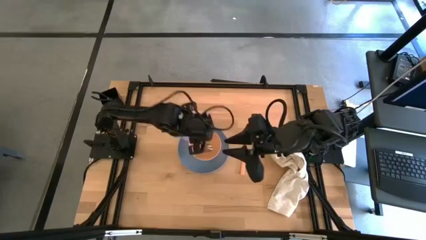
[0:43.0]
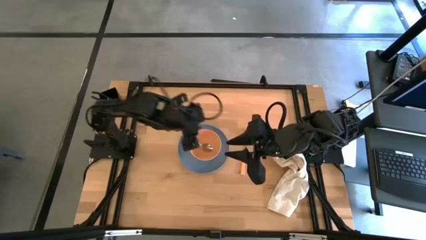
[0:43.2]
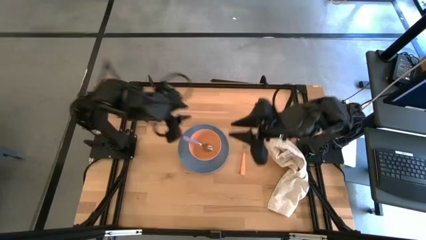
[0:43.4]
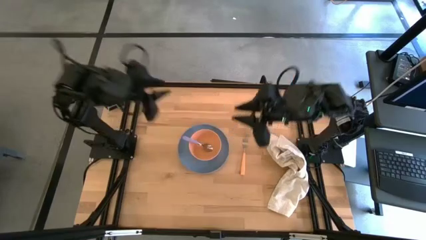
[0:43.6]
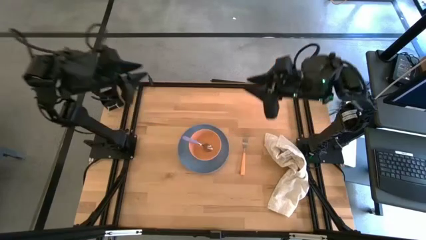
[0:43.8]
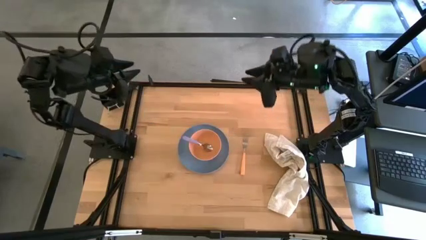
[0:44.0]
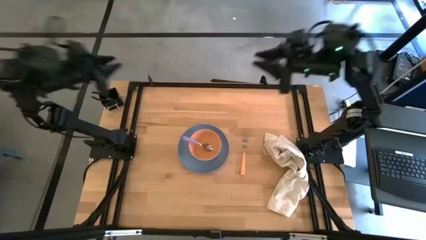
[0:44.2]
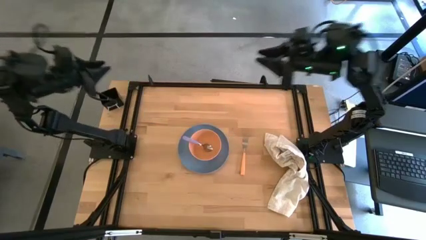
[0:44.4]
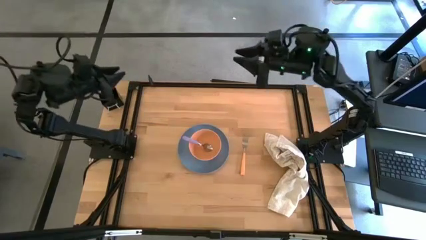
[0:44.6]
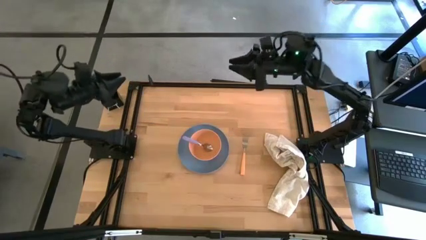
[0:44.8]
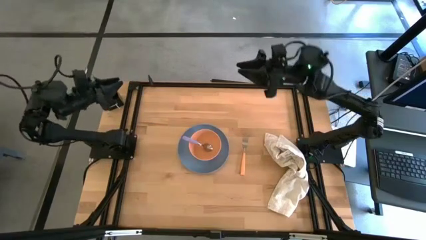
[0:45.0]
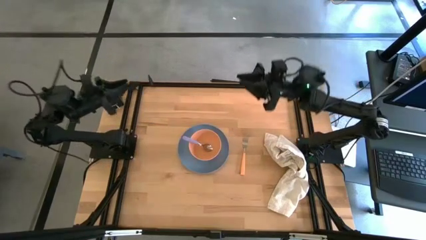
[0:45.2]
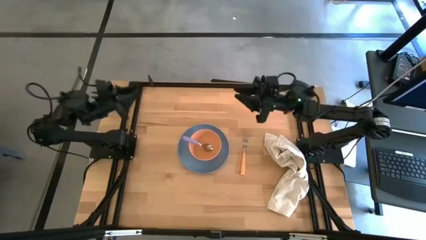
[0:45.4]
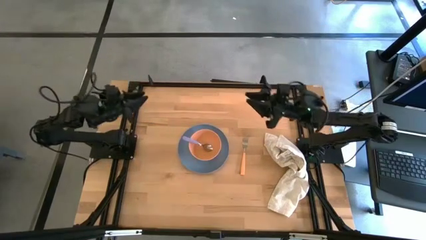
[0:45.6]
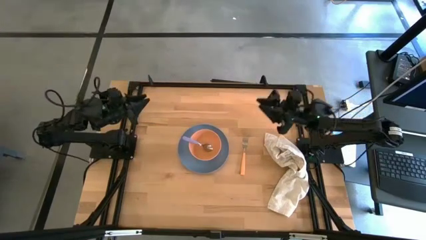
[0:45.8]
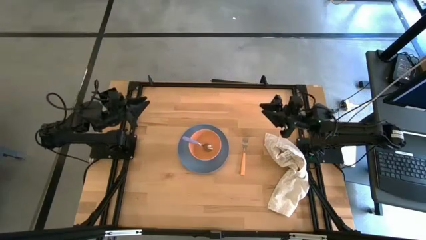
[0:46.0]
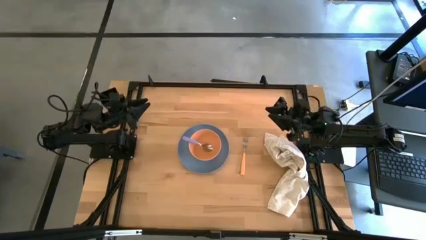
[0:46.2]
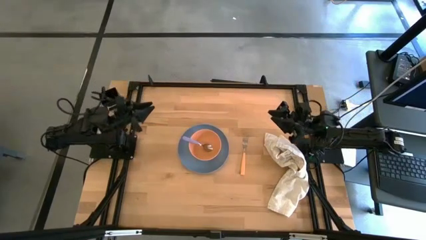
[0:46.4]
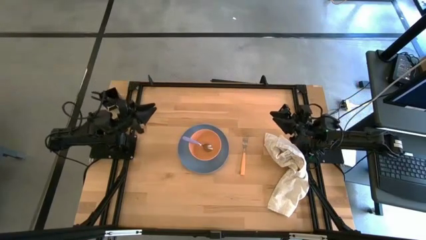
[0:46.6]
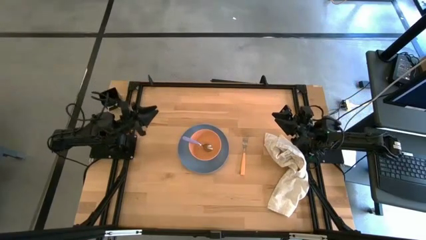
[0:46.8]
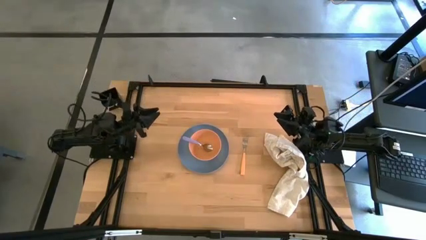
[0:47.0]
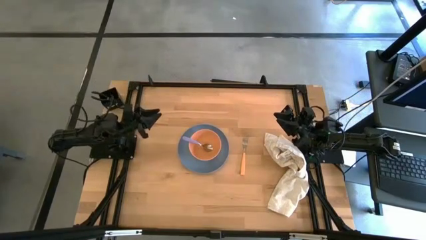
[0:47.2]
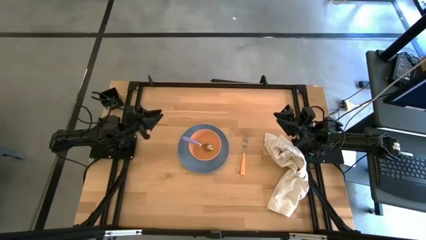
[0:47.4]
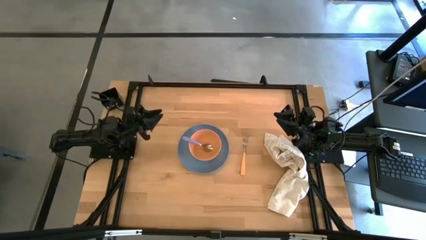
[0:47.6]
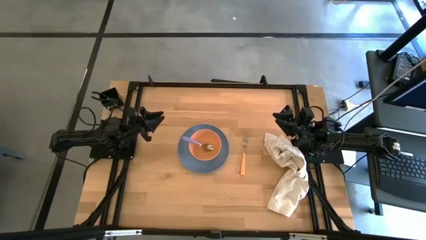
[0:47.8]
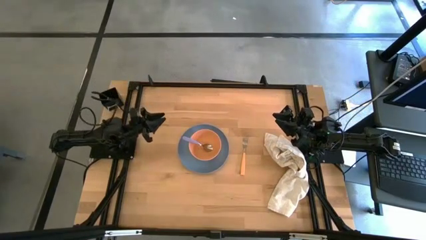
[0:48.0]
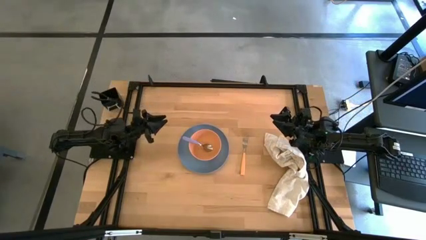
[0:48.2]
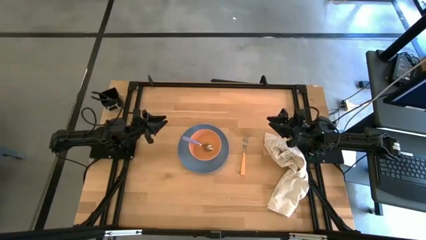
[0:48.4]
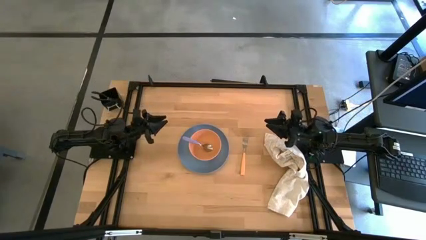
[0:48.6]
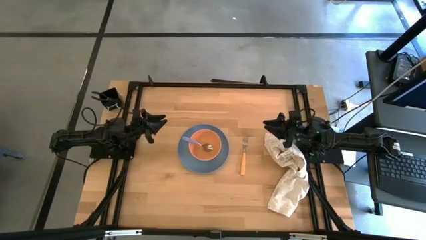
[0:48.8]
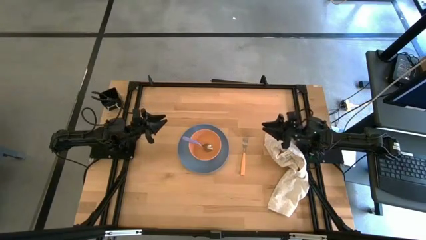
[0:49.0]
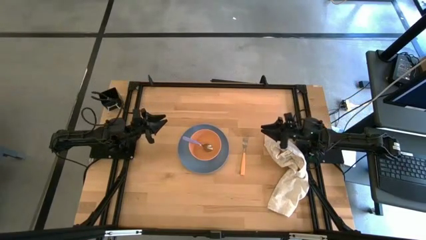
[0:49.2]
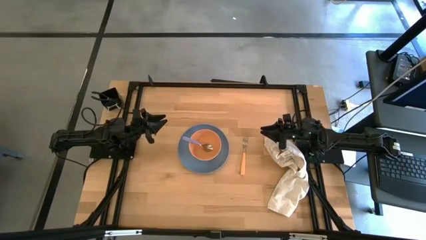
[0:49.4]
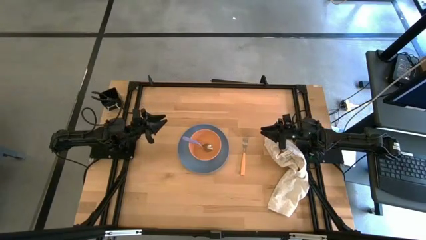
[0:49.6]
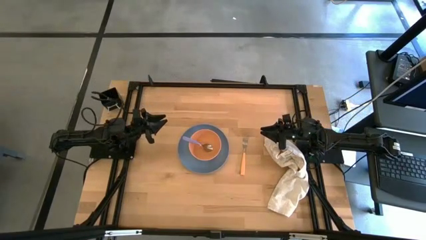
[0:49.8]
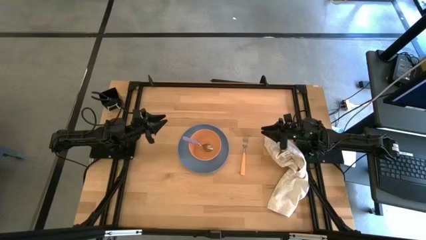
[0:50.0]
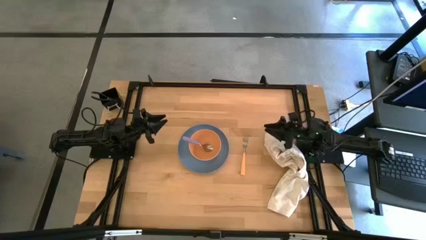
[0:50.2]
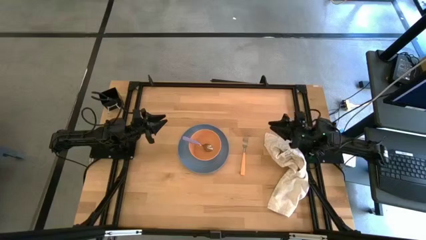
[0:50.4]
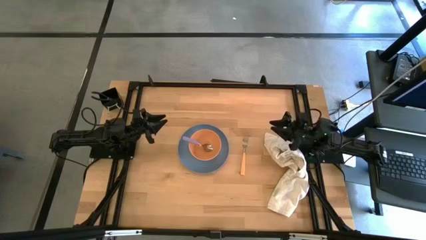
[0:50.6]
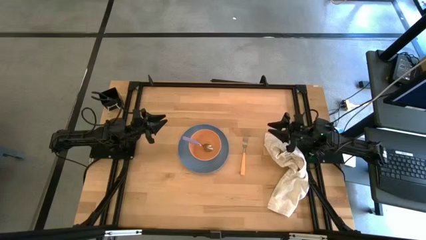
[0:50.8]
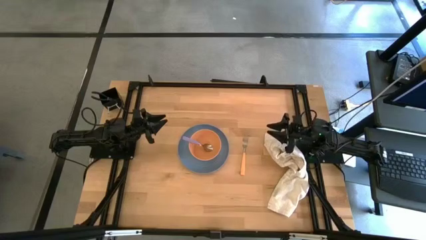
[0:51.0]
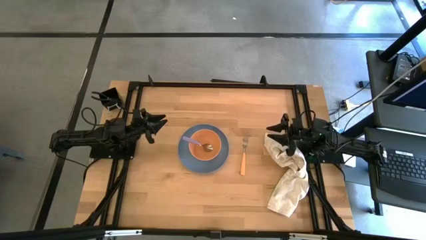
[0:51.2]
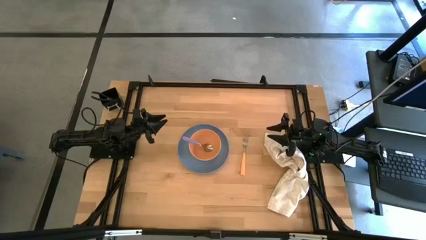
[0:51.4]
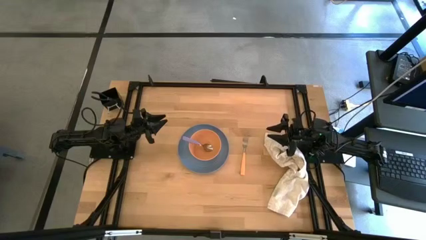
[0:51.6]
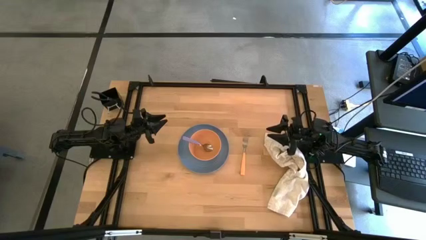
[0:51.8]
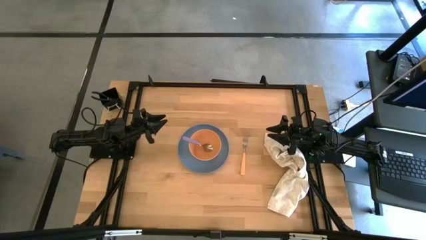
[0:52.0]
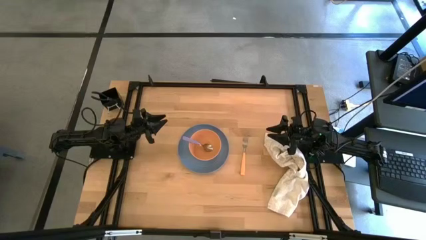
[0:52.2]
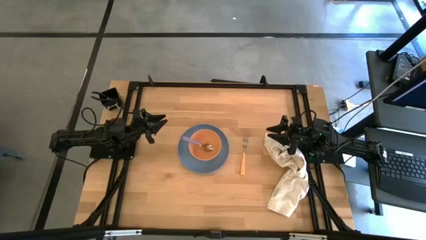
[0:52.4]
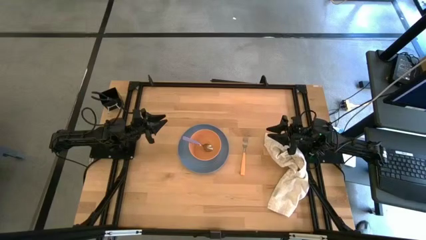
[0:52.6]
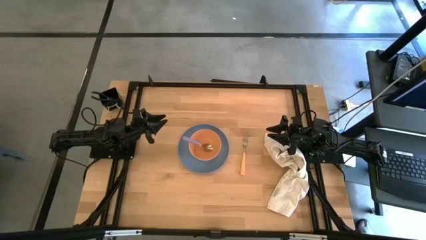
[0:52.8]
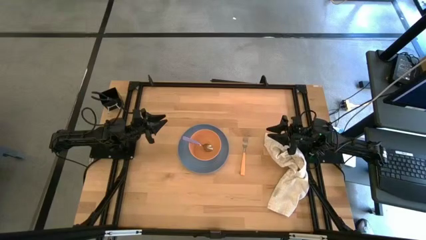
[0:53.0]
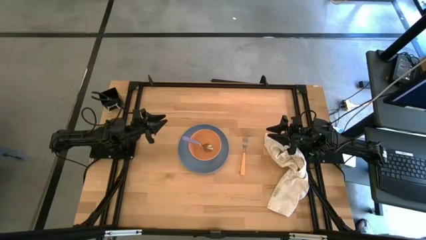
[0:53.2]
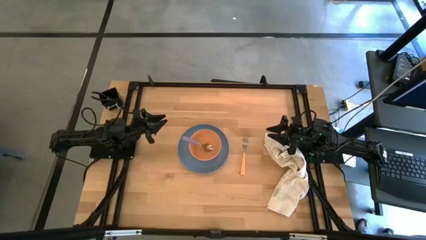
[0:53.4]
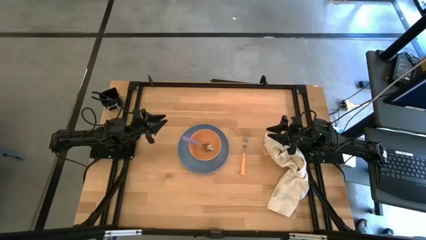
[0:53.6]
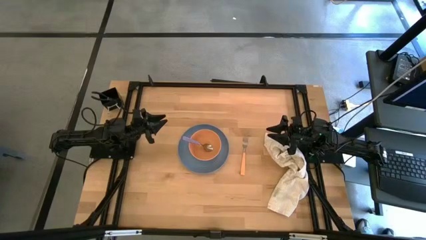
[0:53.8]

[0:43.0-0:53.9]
Task: Set table place
Return to Home Position

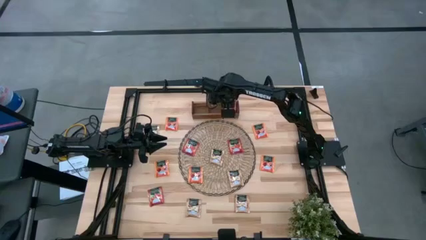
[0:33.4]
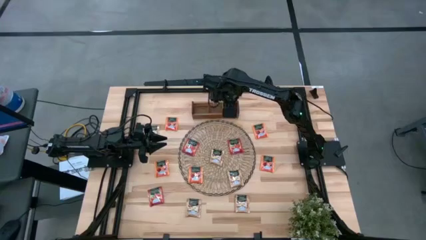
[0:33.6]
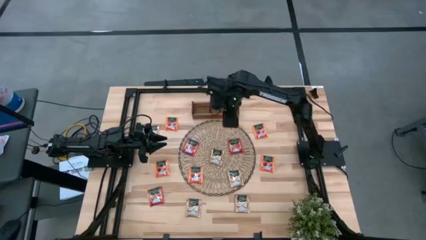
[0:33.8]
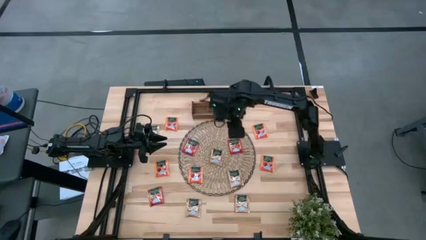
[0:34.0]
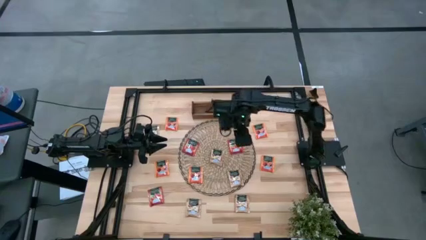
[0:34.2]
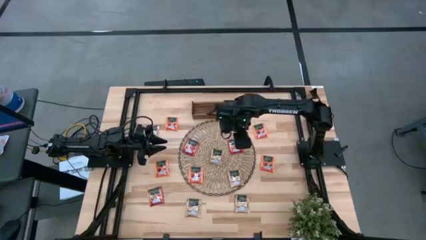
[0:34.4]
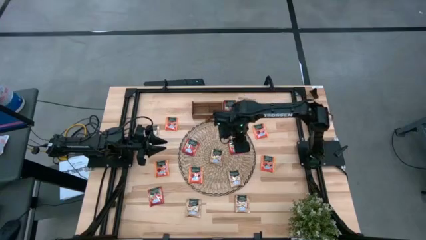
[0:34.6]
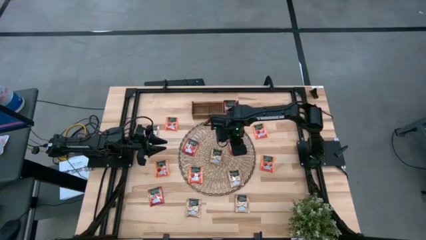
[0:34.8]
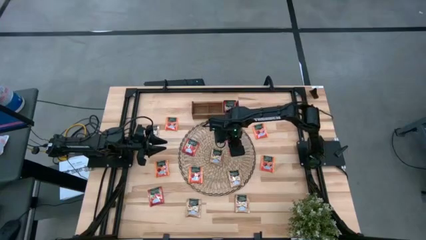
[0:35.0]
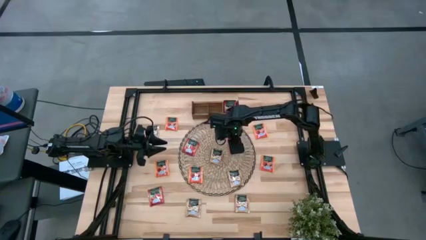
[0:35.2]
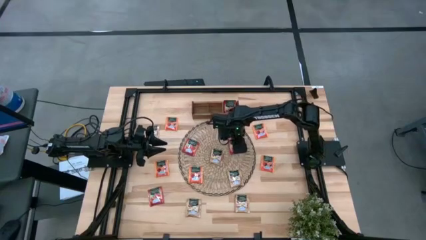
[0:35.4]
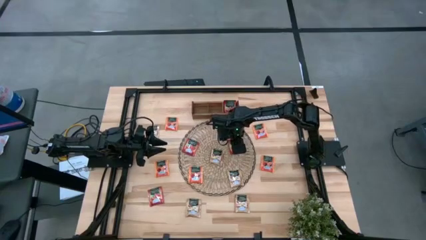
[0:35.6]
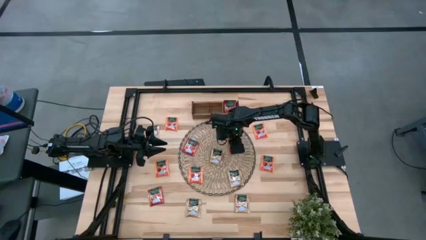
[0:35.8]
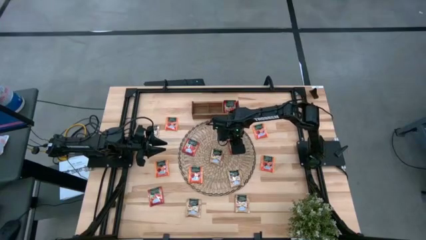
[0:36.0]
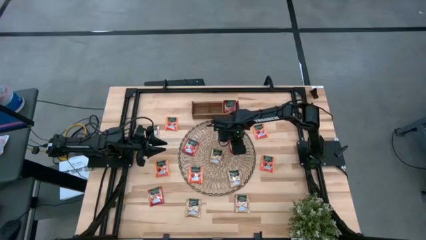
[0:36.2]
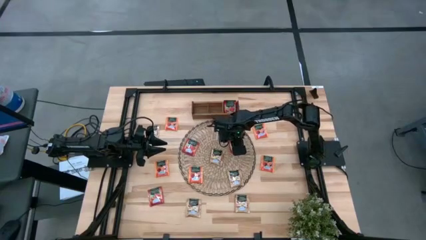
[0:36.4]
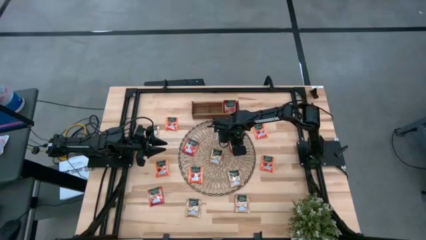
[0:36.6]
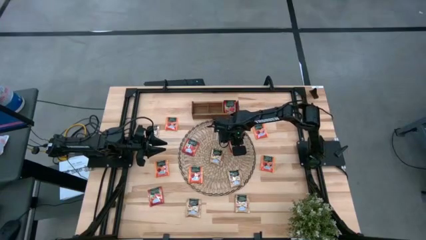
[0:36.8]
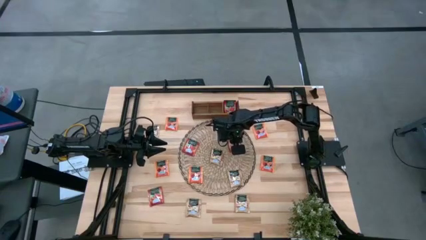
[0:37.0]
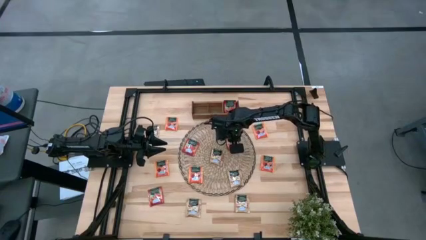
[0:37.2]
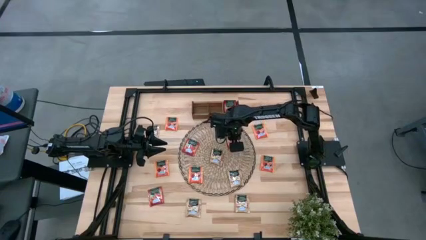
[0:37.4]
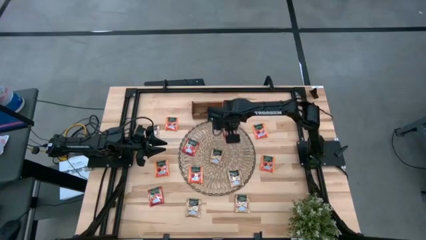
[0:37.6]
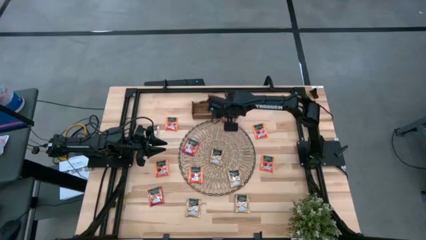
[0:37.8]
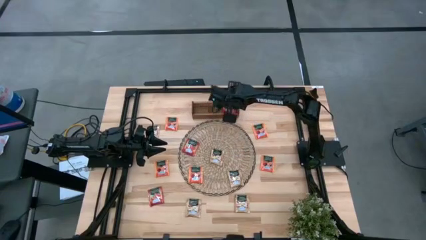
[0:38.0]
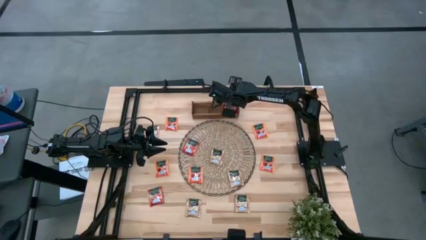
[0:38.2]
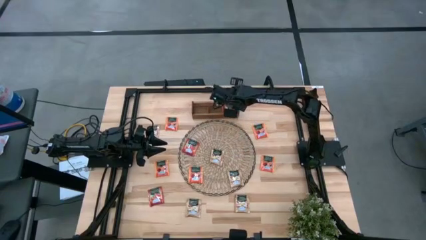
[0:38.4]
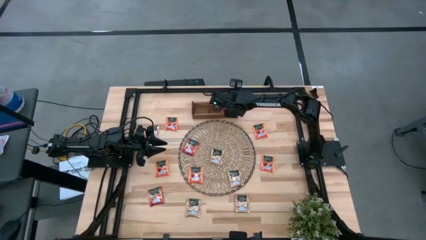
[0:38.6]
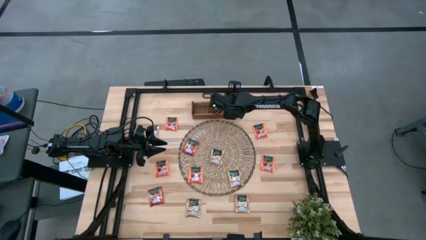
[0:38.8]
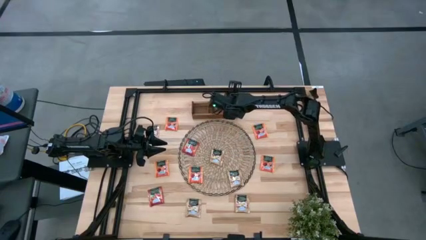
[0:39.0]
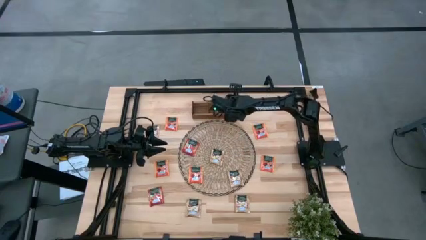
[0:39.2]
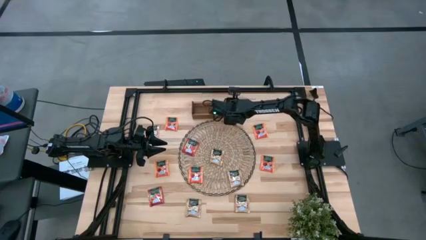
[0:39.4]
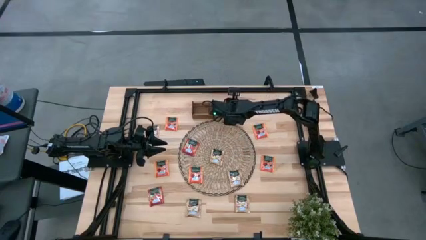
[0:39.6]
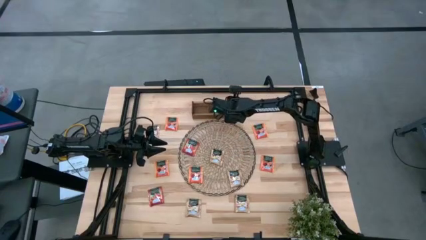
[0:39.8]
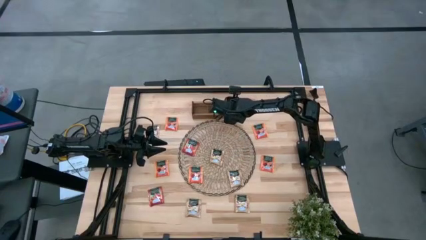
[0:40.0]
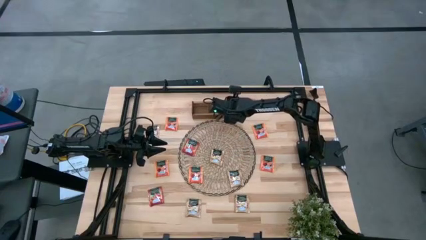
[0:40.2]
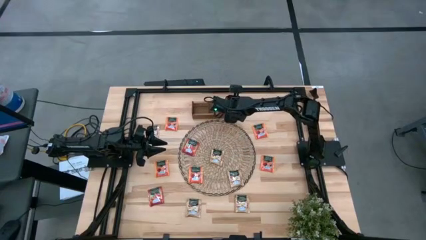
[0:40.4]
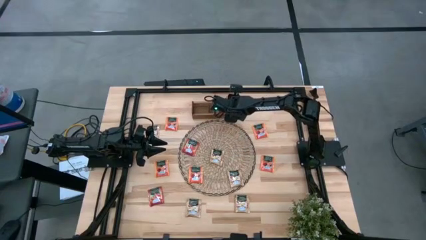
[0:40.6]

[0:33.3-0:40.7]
Task: Pick & Place Tea
Put the red tea bag into the right section of the wooden organizer
